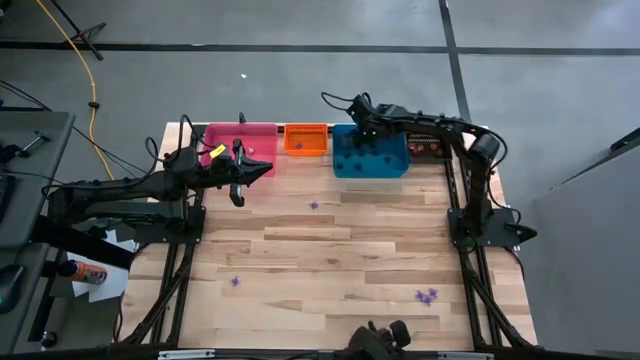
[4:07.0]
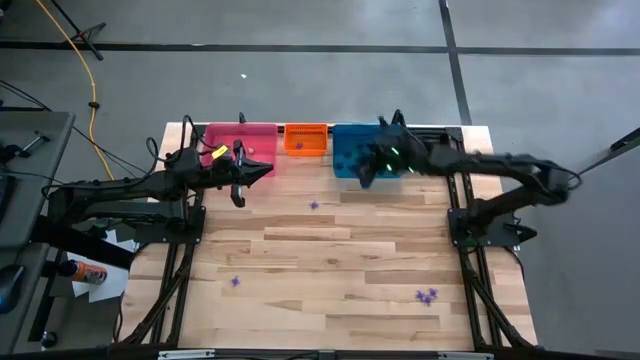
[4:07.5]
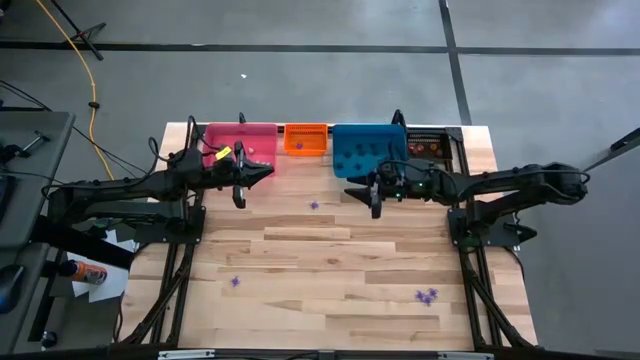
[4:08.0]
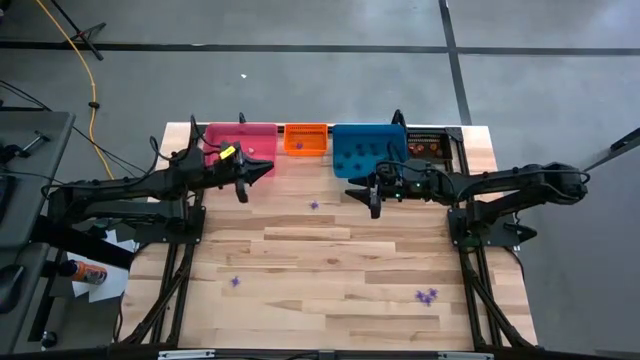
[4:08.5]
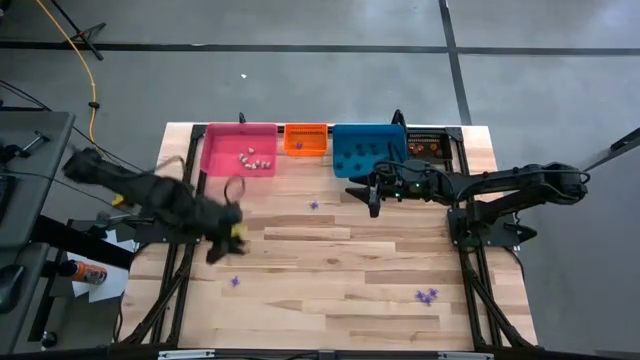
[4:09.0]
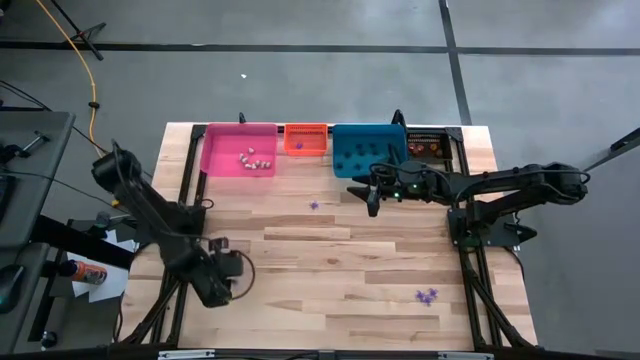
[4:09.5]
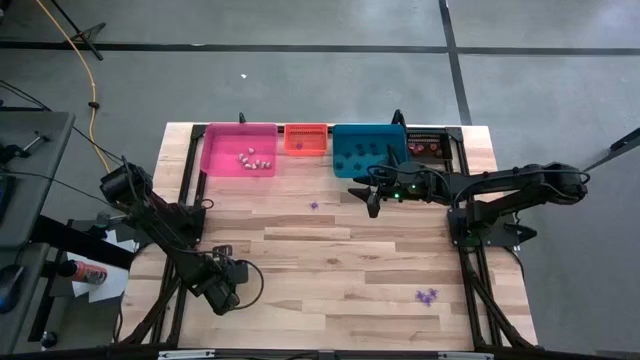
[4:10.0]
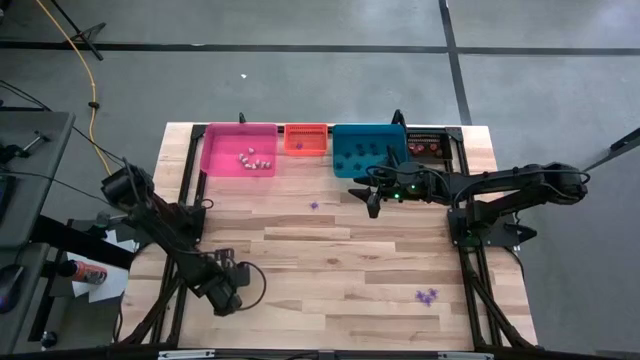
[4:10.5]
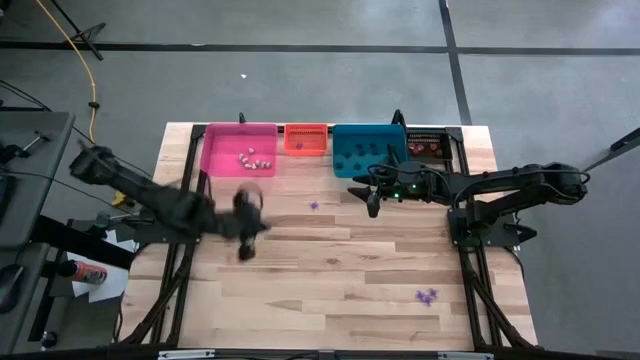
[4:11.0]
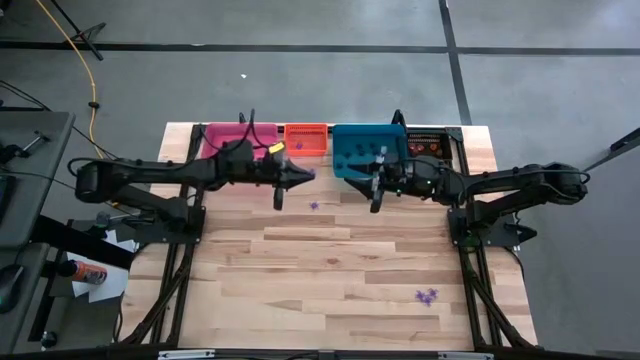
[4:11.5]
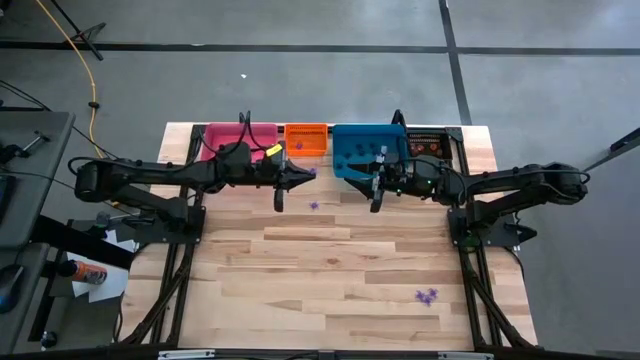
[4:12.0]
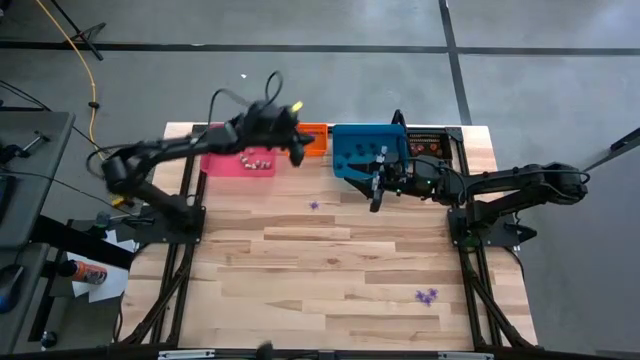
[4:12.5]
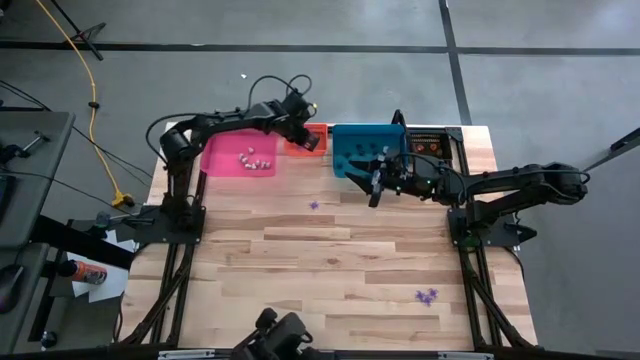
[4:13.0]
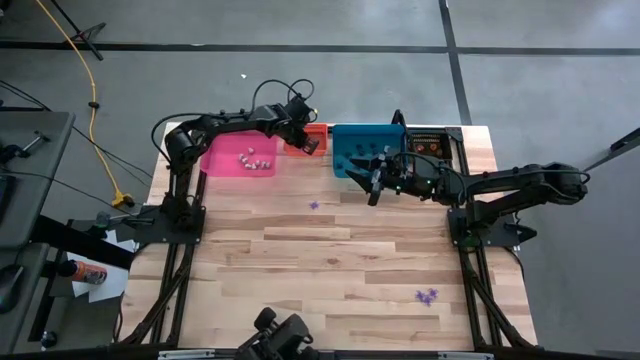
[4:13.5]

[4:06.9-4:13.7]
Task: Sort Halloween decoration
Put the violet spider toy into the orange bin

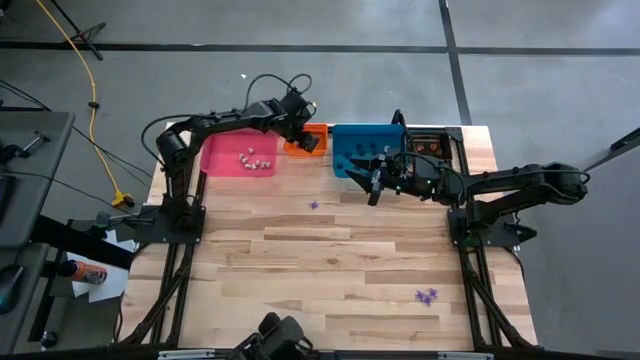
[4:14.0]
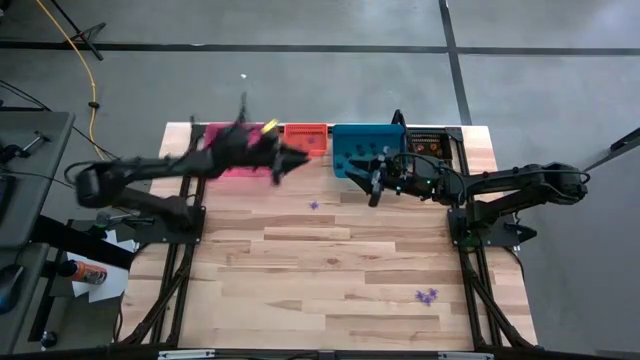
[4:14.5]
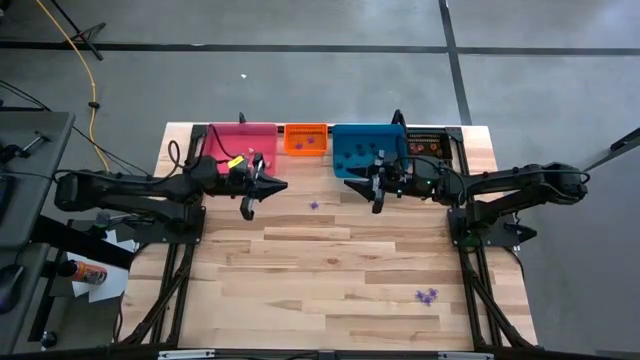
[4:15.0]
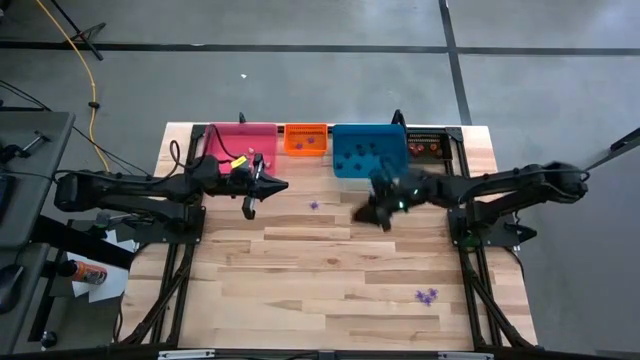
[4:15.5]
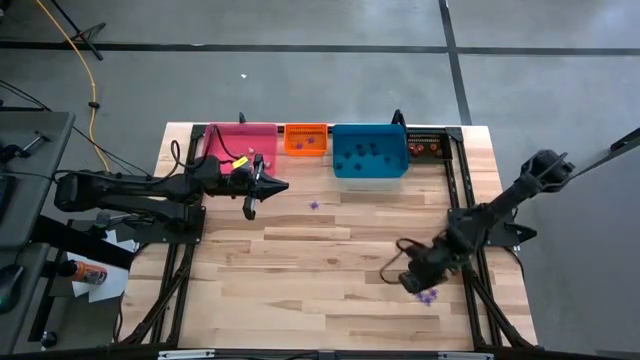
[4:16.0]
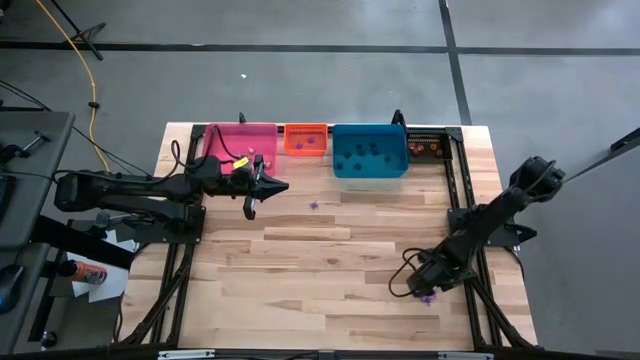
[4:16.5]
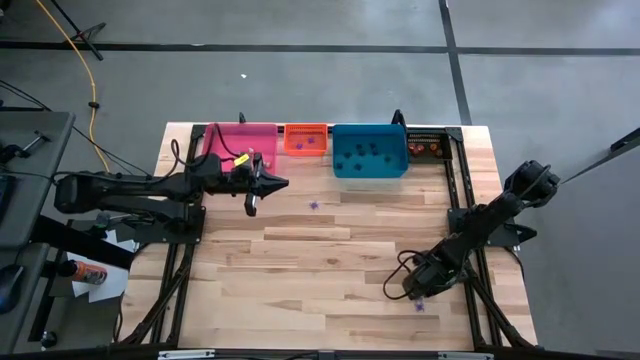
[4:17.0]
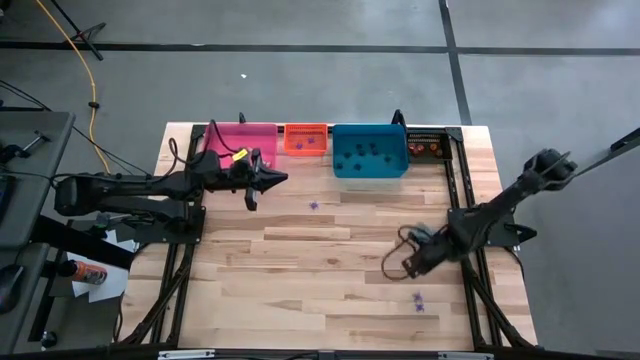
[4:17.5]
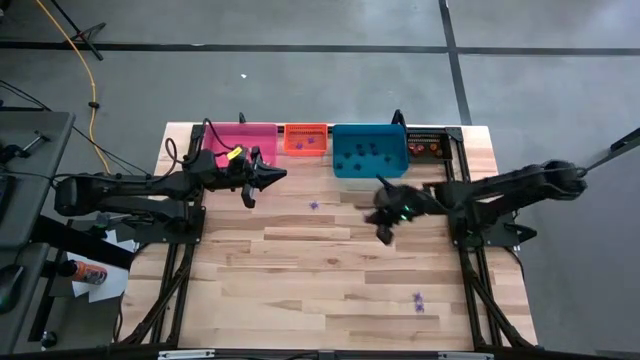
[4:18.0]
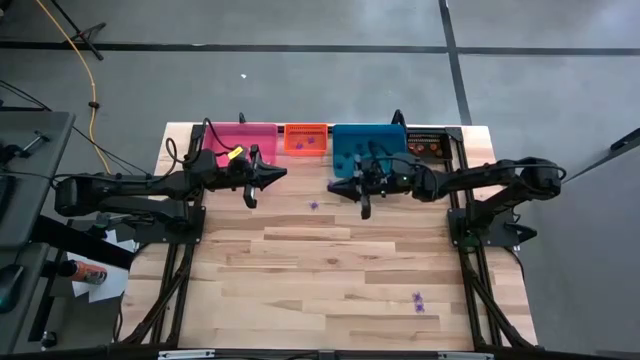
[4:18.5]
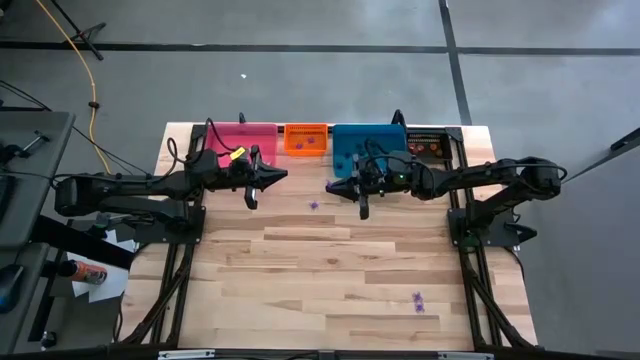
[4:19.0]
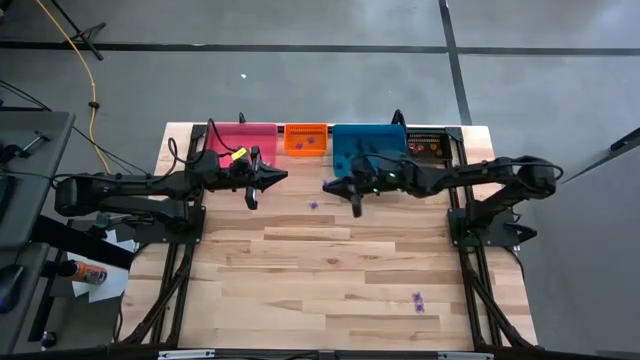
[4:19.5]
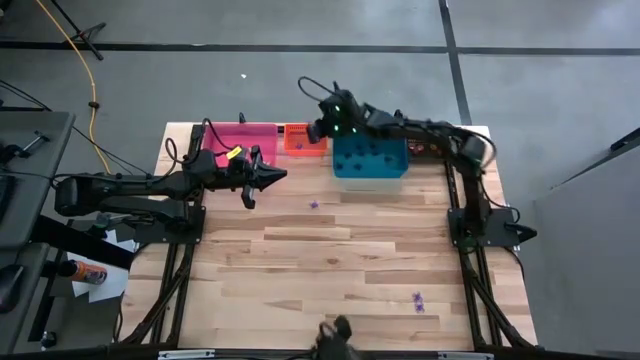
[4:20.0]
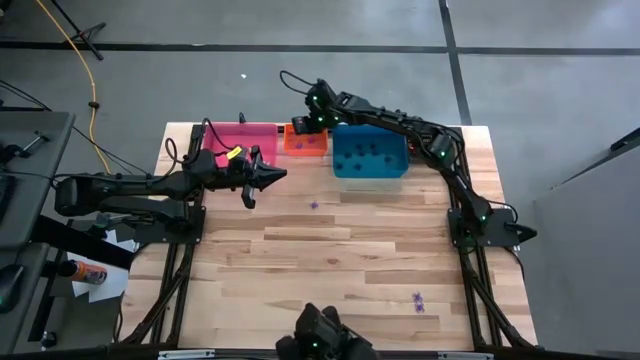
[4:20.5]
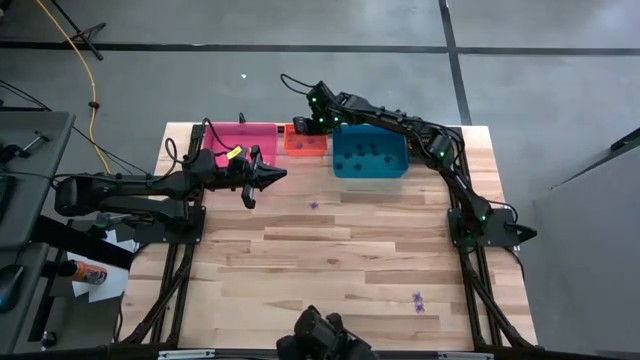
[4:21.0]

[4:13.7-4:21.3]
Put the violet spider toy into the orange bin

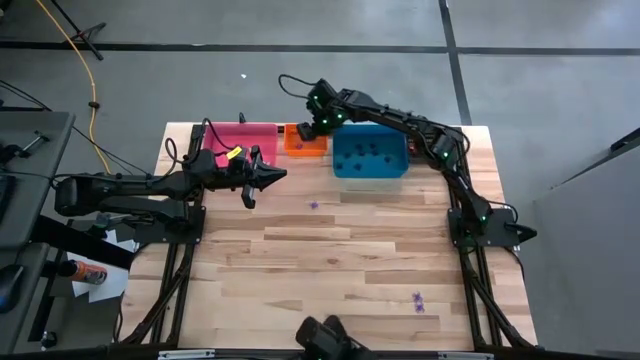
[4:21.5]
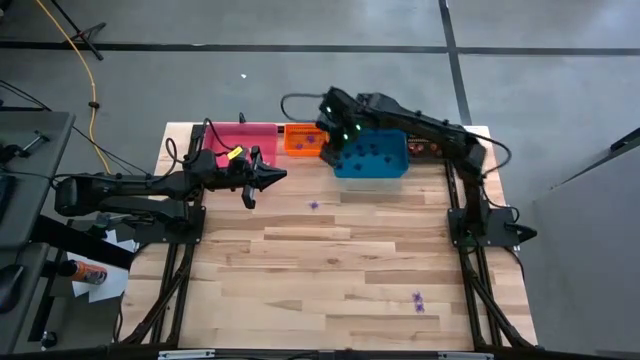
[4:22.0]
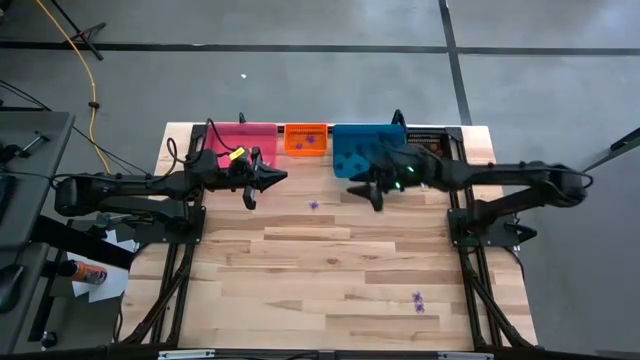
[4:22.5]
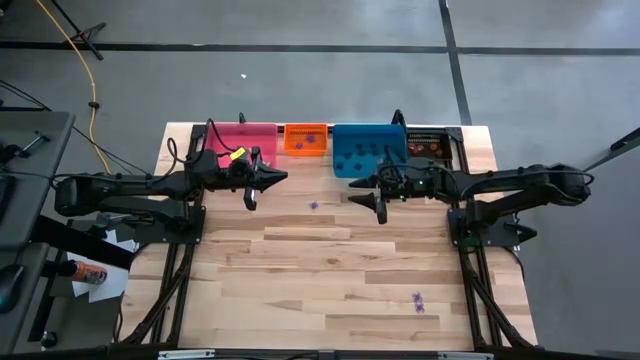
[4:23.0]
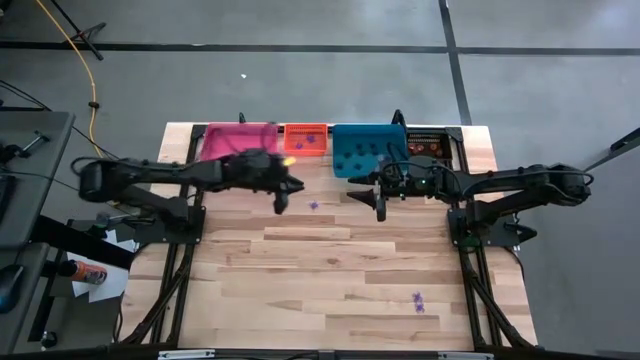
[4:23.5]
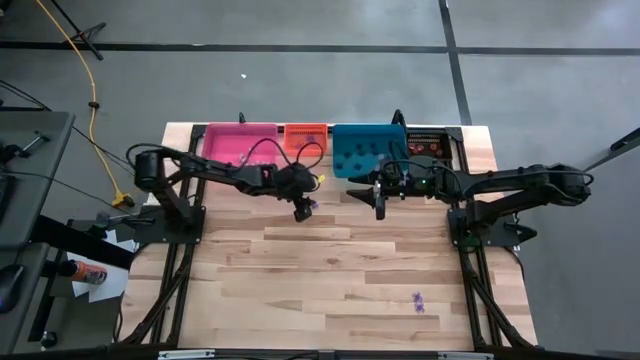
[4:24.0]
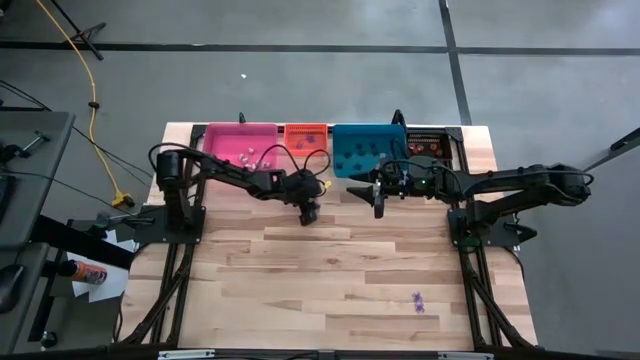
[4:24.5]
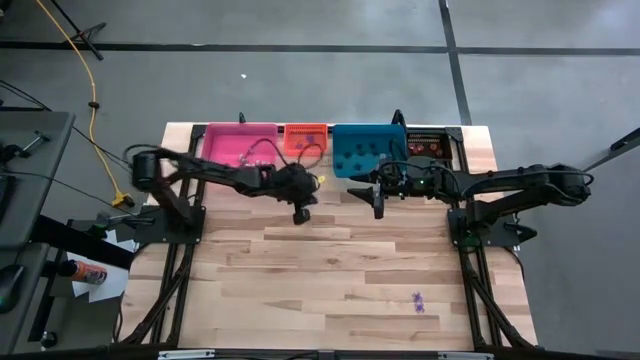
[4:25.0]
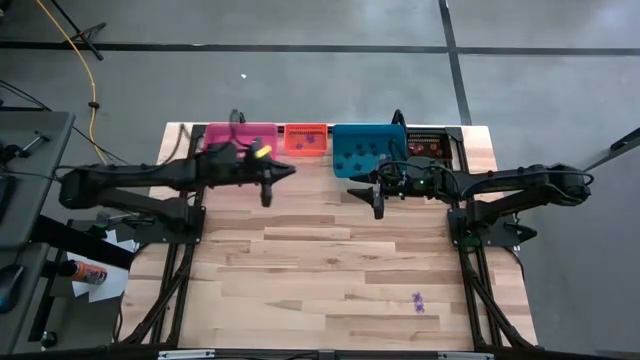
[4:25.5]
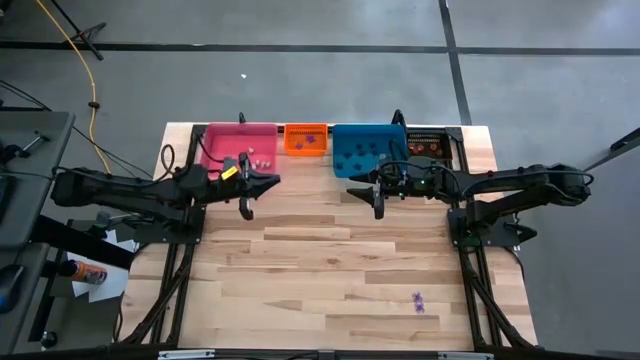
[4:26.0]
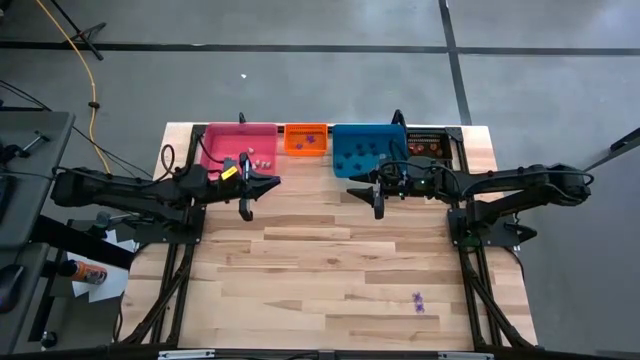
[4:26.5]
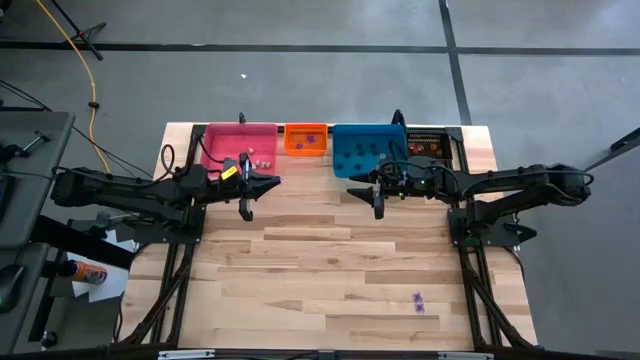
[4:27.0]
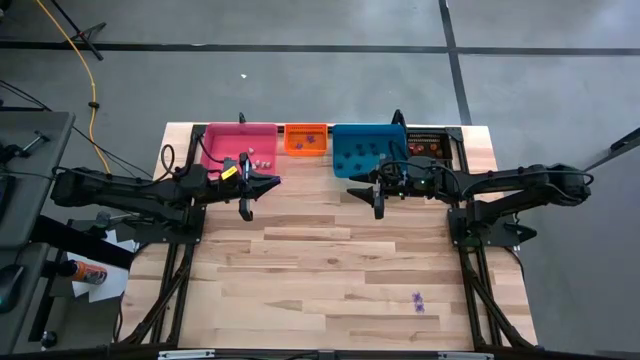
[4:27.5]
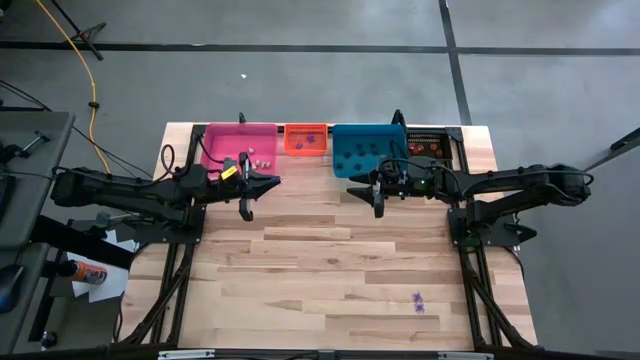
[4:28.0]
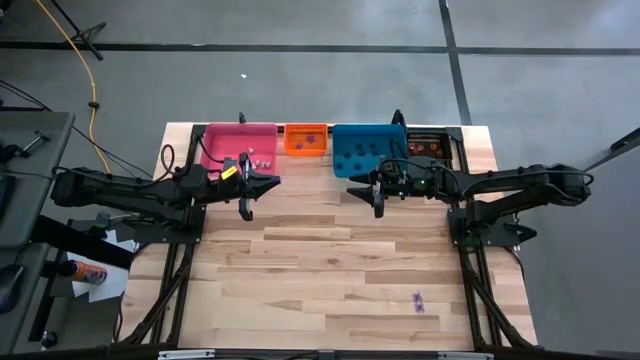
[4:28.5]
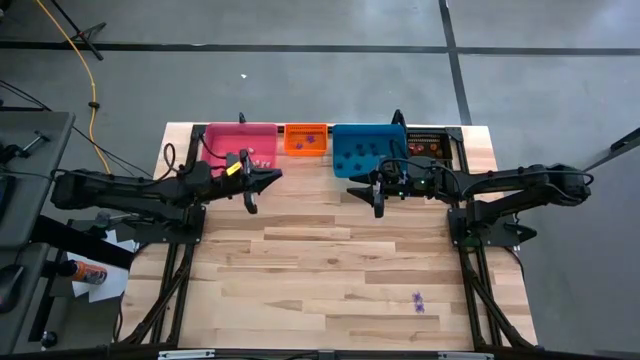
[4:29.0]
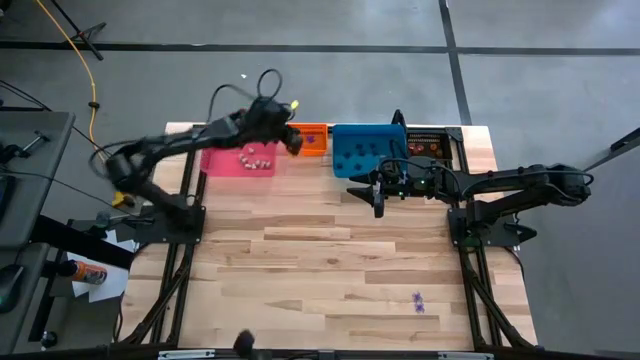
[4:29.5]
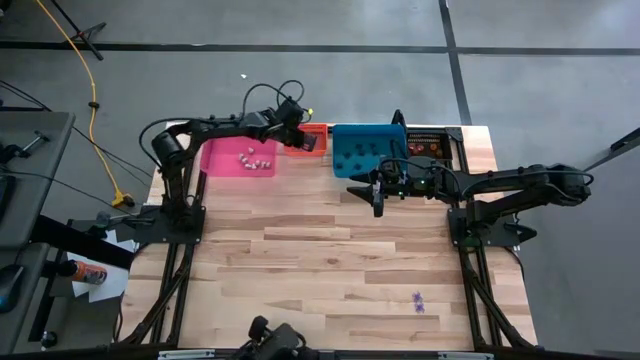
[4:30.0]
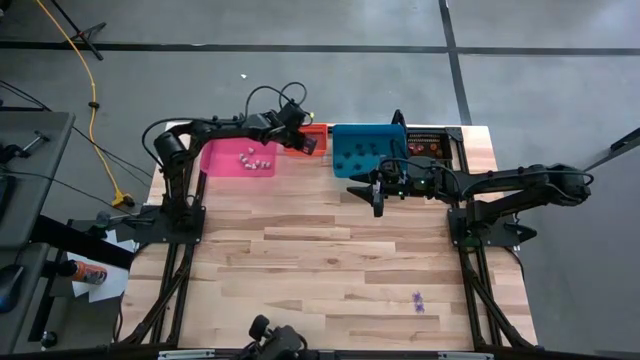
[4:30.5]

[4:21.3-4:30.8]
Put the violet spider toy into the orange bin
